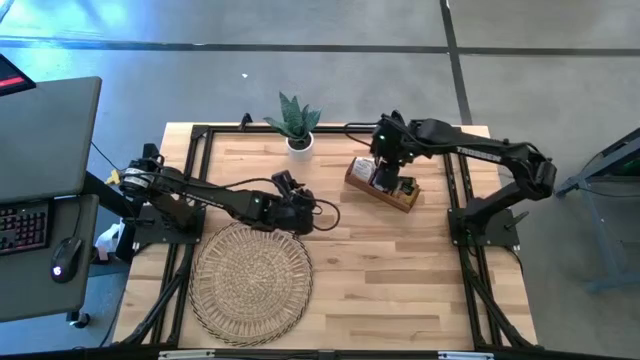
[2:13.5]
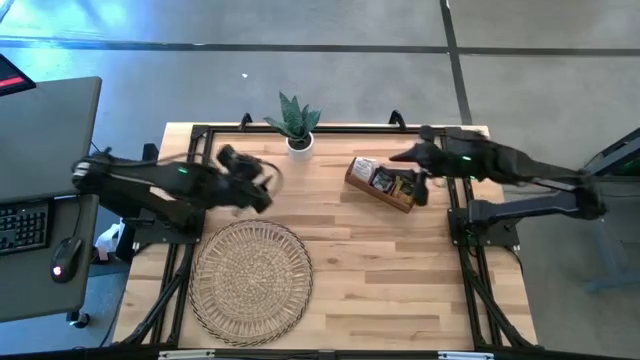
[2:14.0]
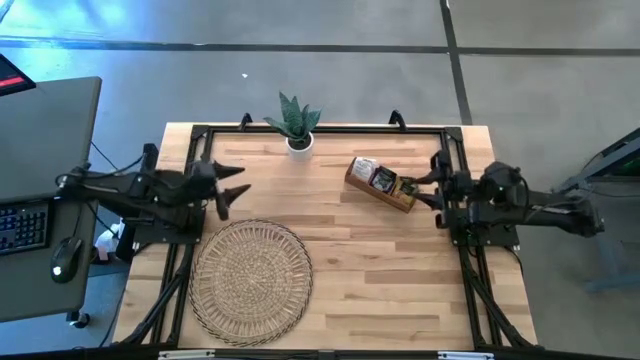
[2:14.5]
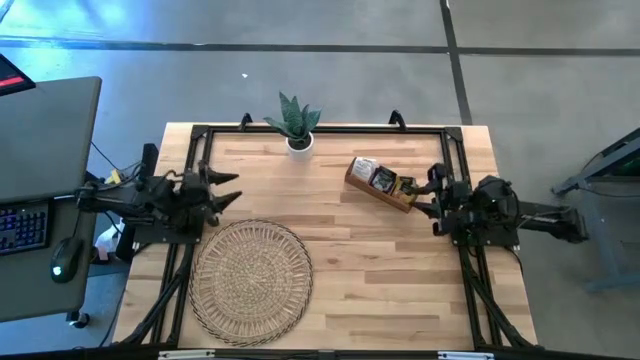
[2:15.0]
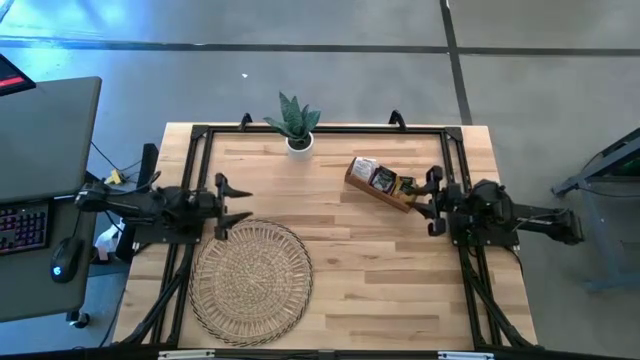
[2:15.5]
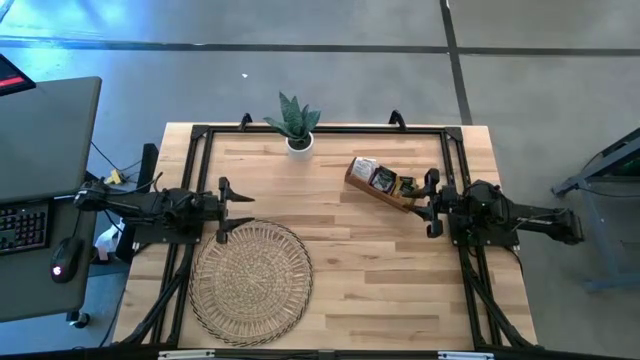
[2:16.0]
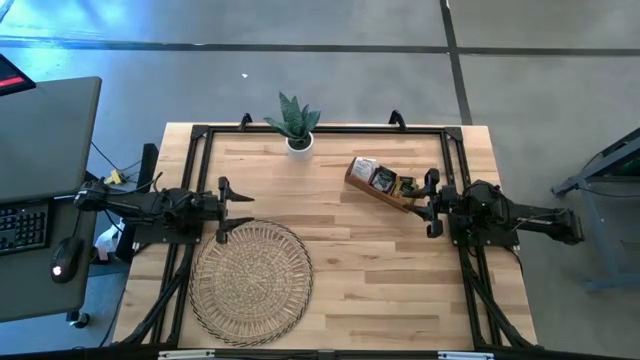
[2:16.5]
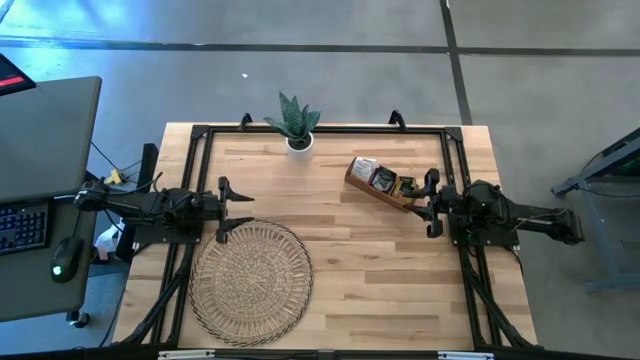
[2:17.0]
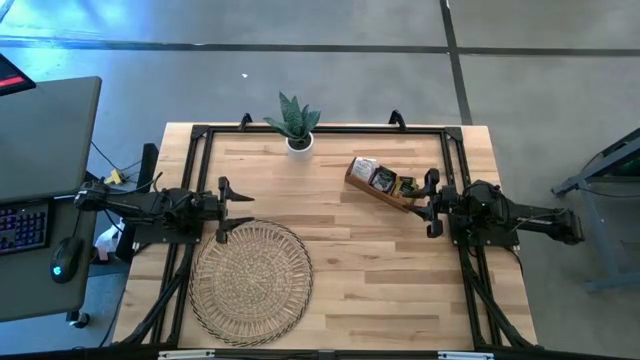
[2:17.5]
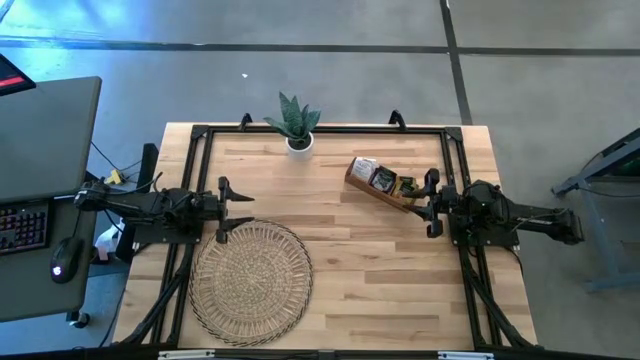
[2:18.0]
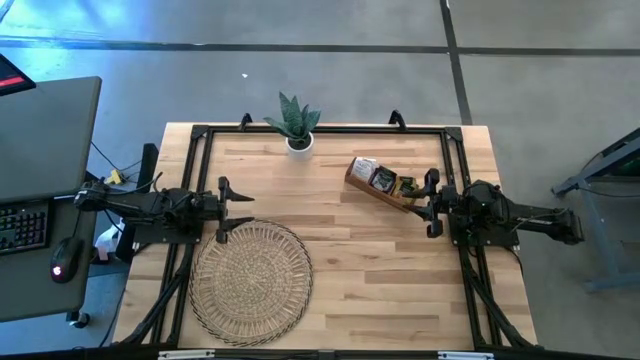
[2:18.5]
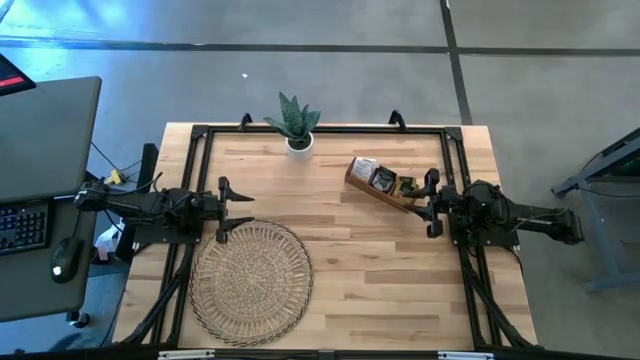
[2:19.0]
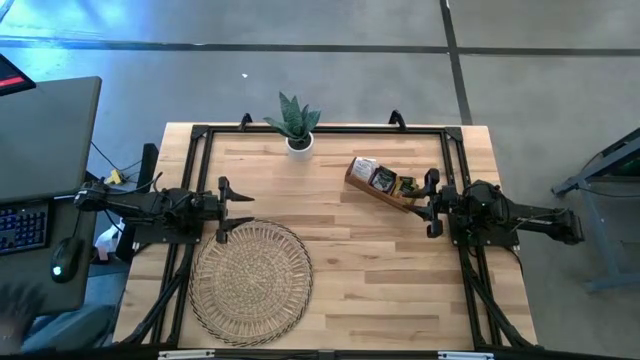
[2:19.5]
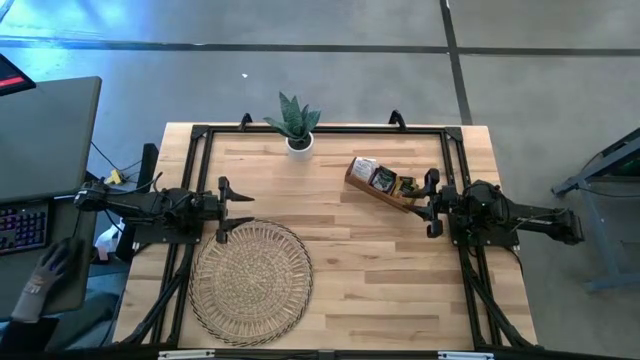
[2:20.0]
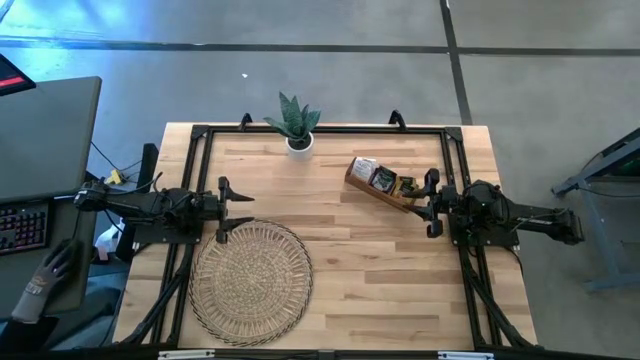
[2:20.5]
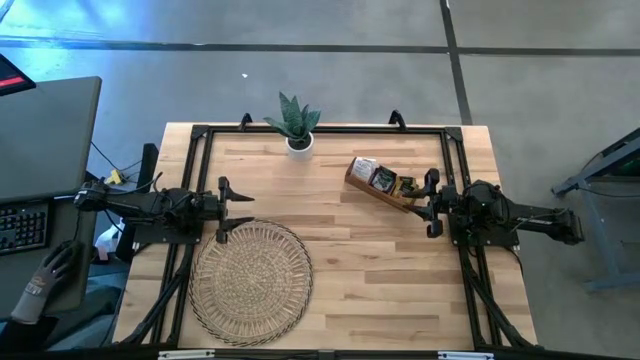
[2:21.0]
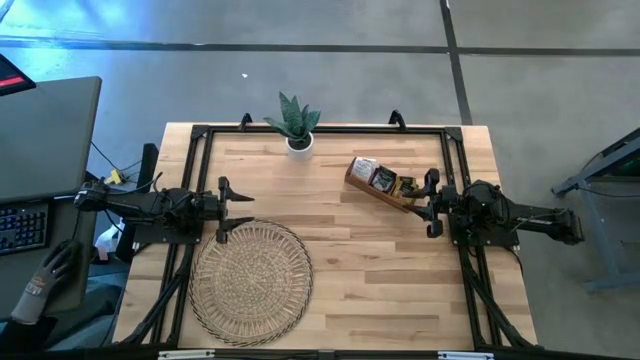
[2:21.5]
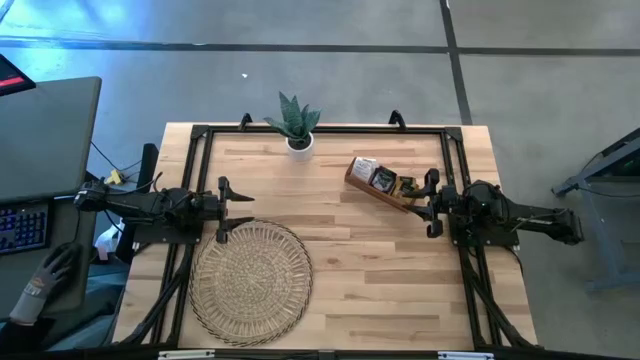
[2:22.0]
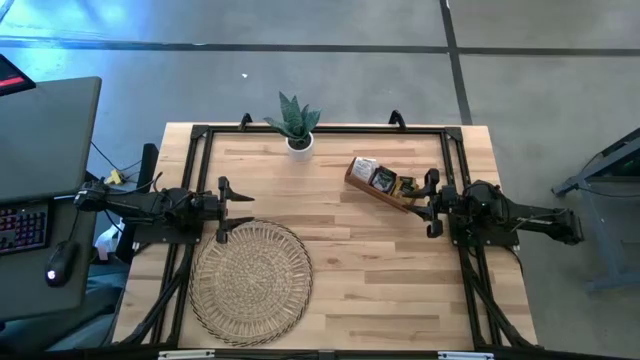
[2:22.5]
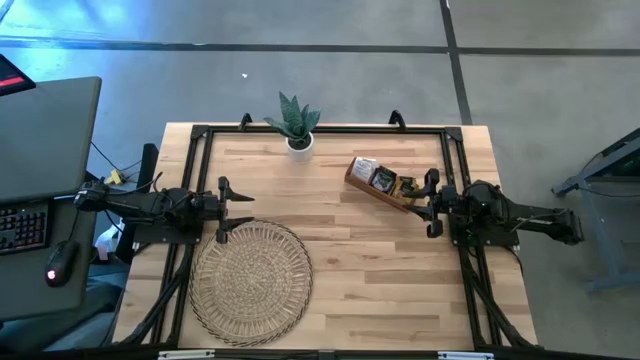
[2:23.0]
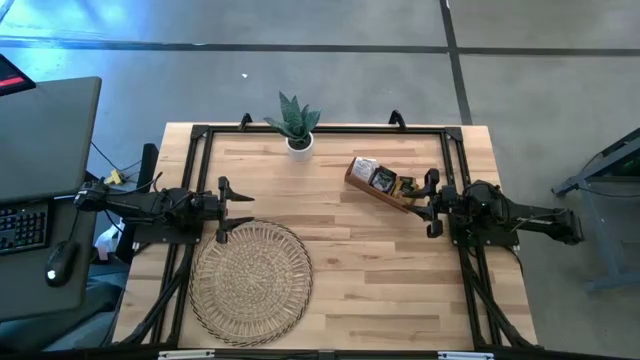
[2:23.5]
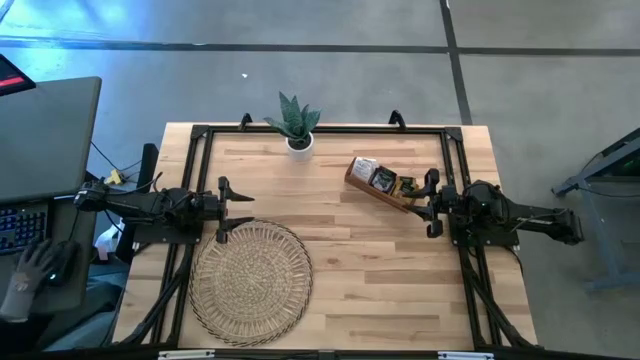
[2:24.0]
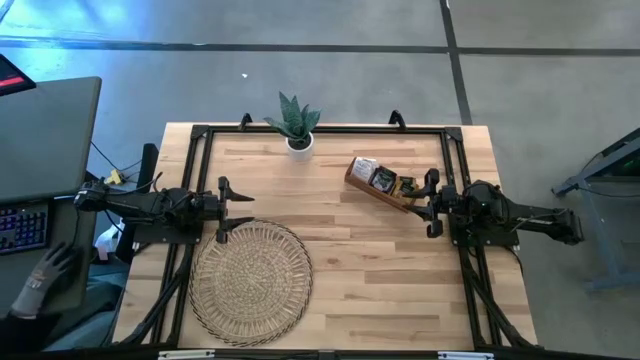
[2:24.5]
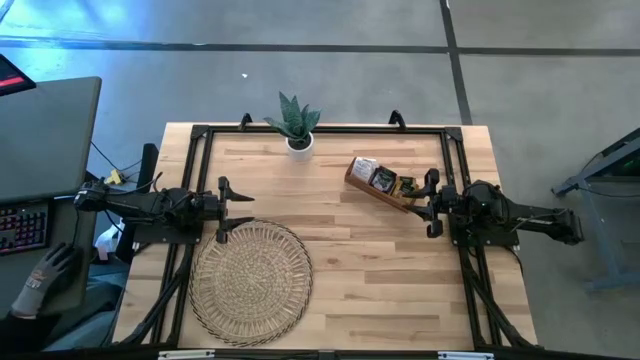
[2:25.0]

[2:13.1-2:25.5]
Task: Pick & Place Tea
Return to home position

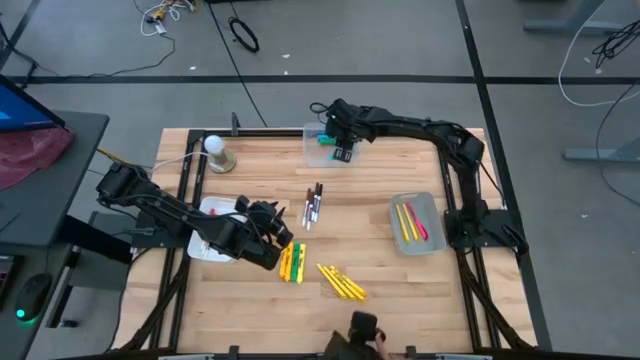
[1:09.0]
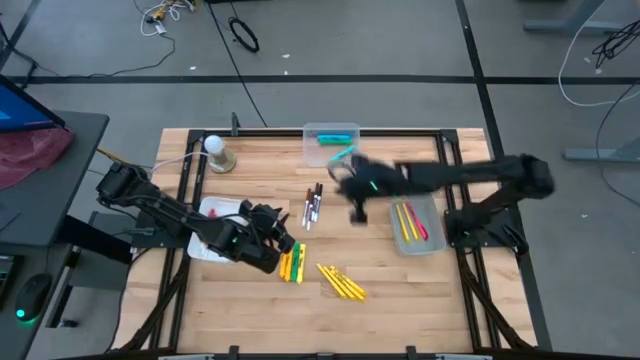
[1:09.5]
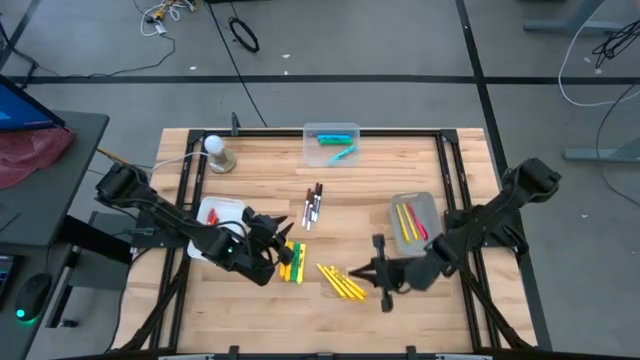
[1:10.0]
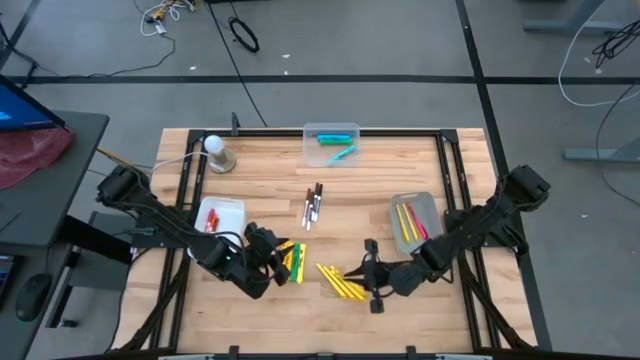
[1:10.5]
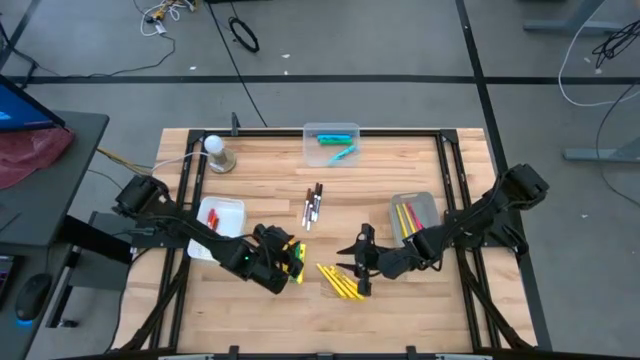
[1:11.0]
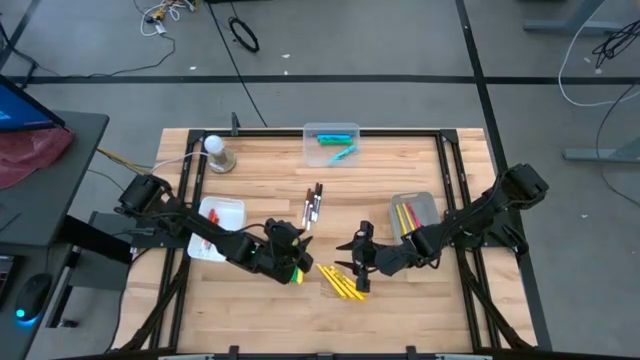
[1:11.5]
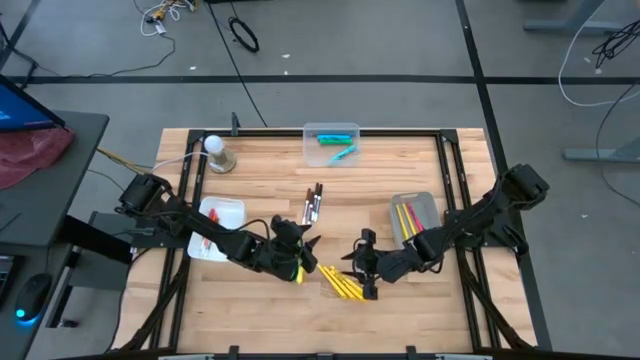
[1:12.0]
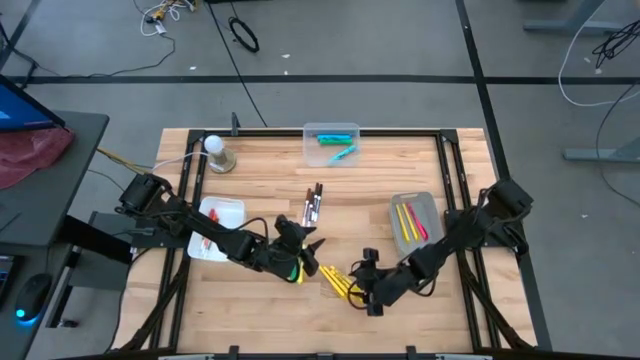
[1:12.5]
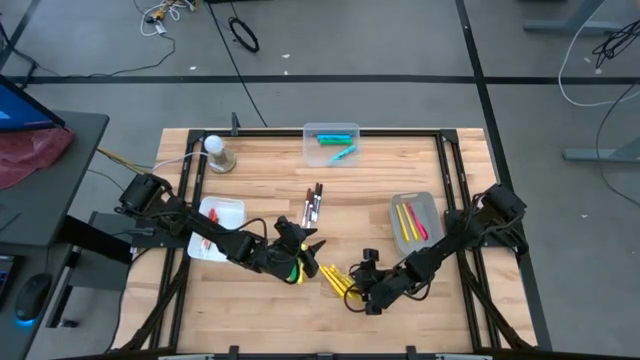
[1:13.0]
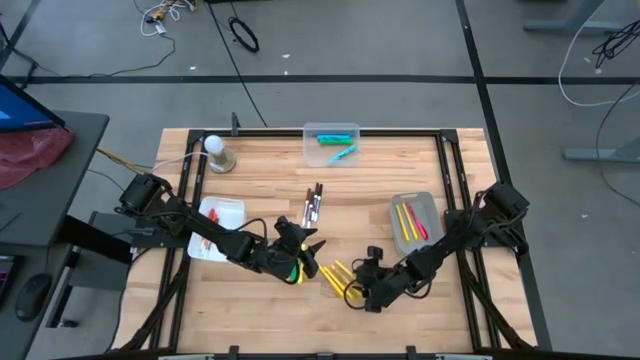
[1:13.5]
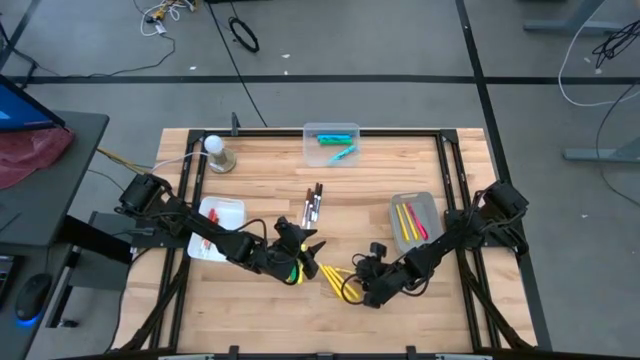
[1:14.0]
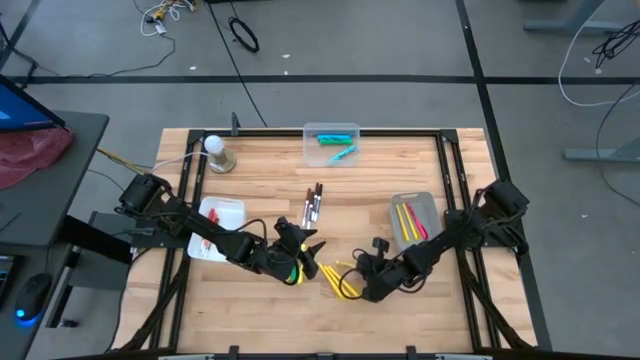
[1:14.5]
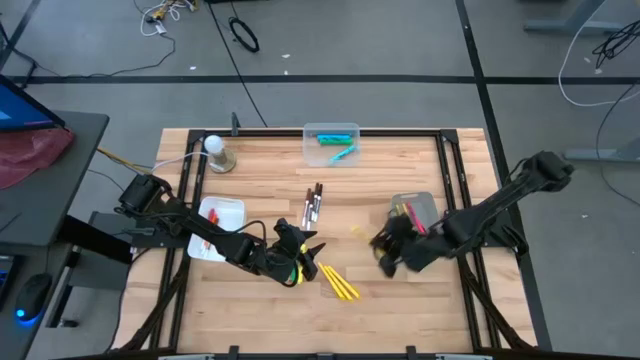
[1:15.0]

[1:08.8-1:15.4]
Task: Pick & Place Markers
Put the yellow pen into the gray bin

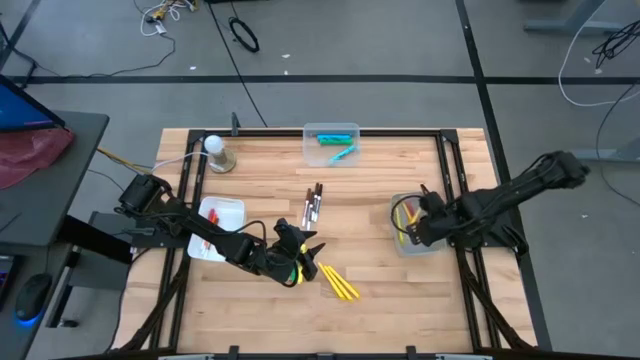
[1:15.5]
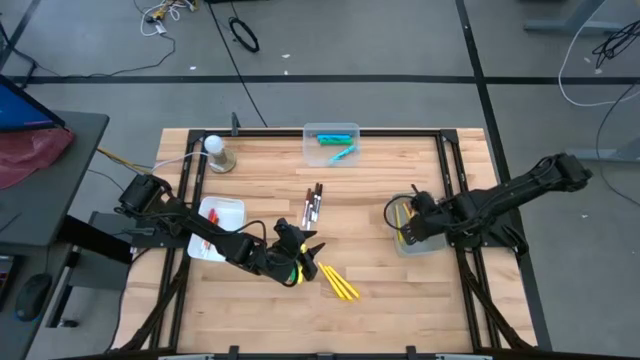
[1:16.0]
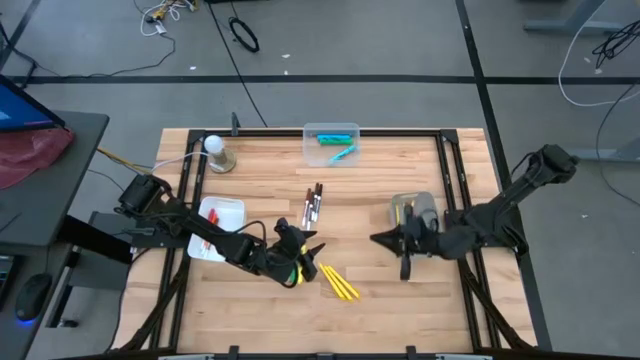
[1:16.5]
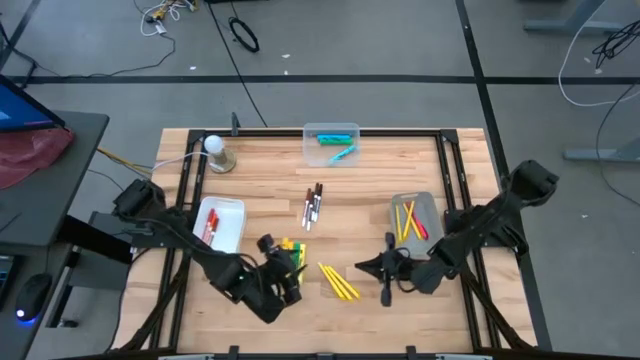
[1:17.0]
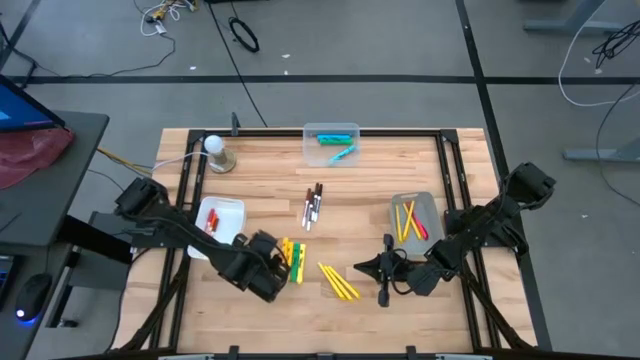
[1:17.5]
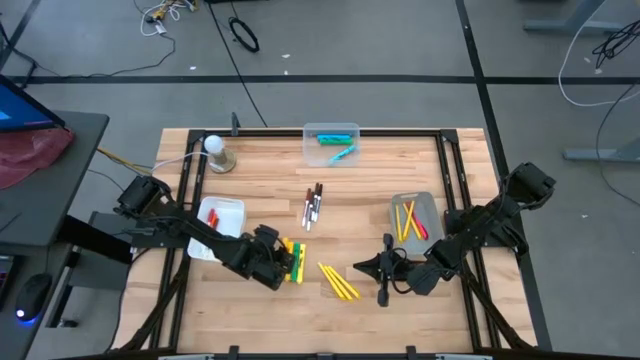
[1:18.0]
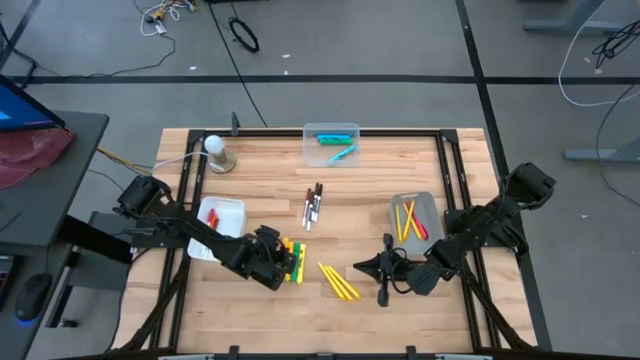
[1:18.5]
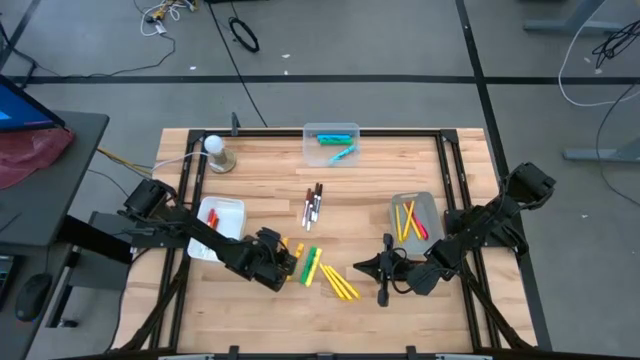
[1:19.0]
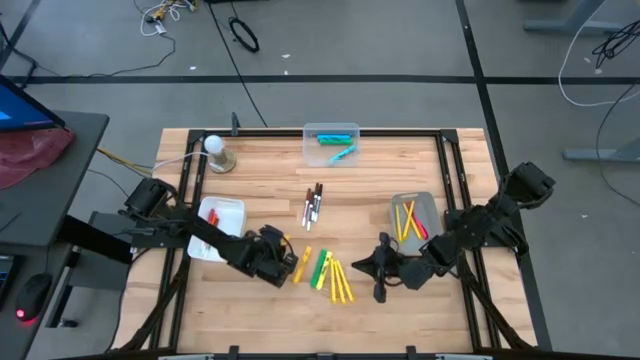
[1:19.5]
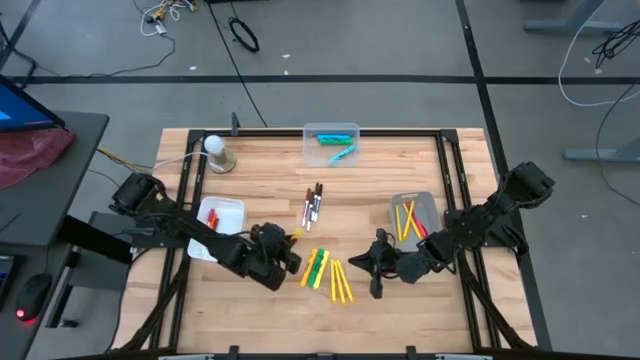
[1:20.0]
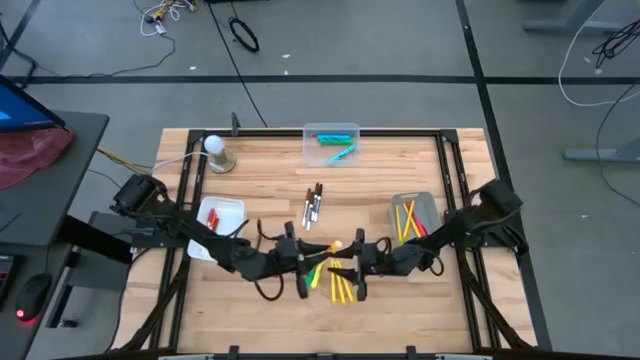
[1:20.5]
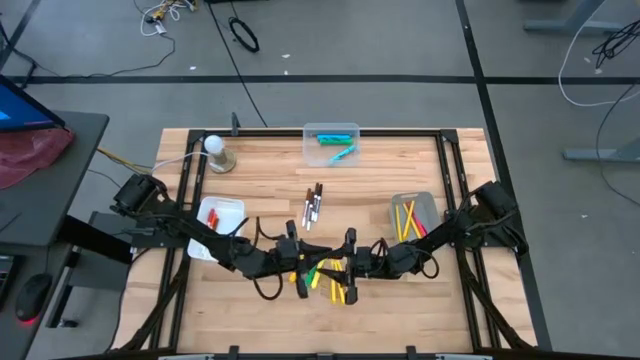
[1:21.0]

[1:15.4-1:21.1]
Put the yellow highlighter pen into the transparent bin
